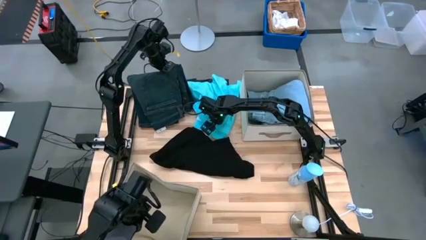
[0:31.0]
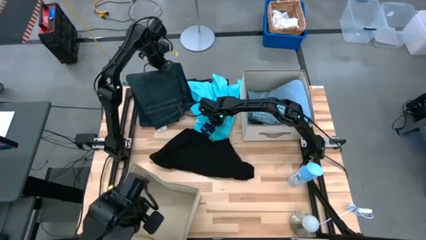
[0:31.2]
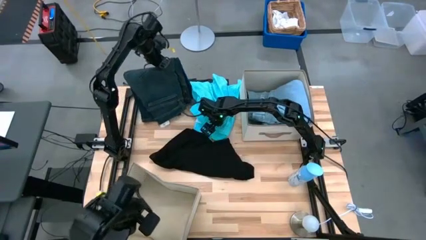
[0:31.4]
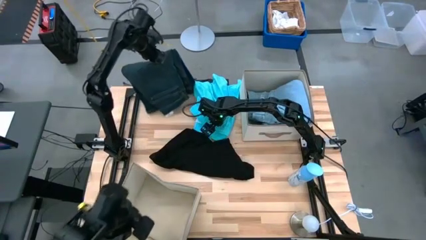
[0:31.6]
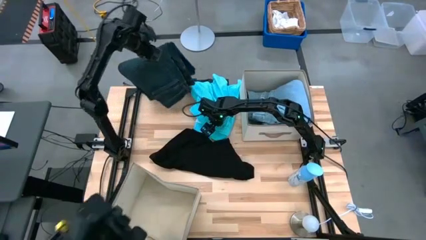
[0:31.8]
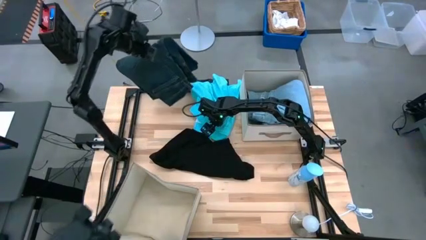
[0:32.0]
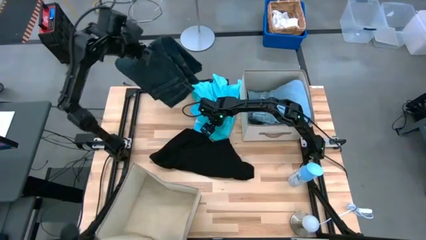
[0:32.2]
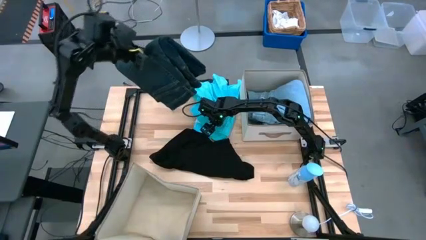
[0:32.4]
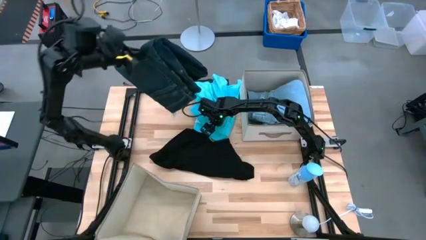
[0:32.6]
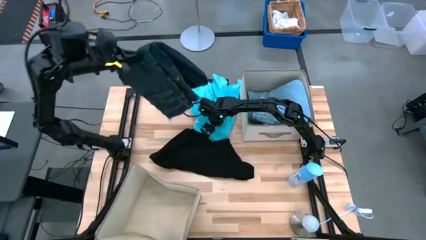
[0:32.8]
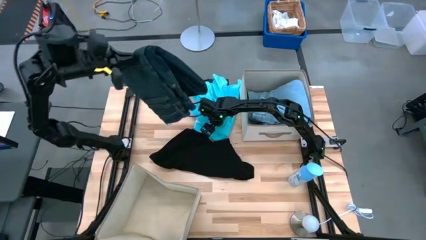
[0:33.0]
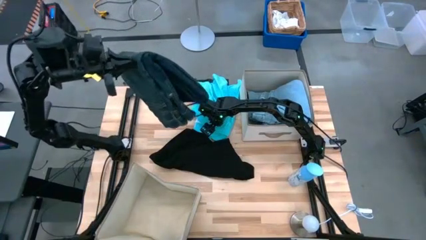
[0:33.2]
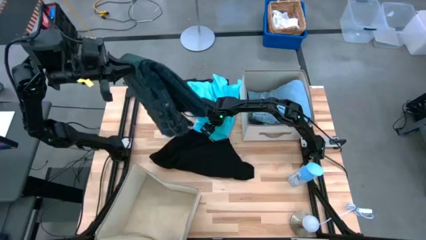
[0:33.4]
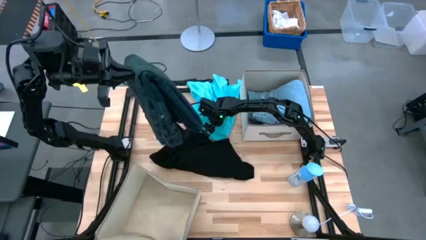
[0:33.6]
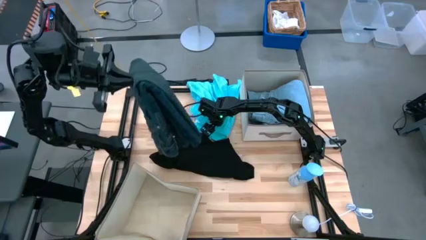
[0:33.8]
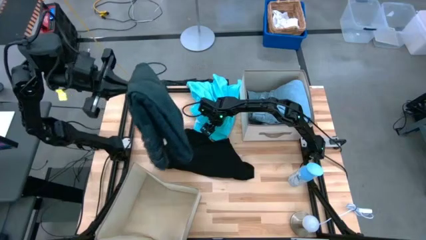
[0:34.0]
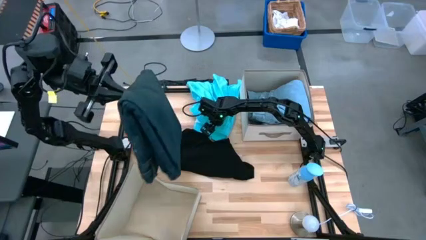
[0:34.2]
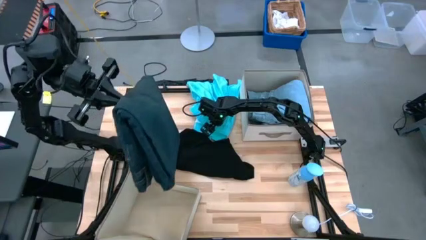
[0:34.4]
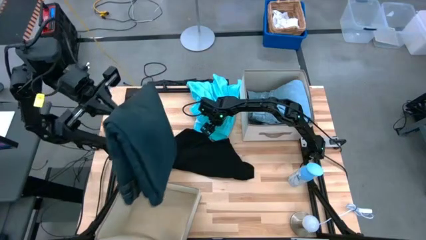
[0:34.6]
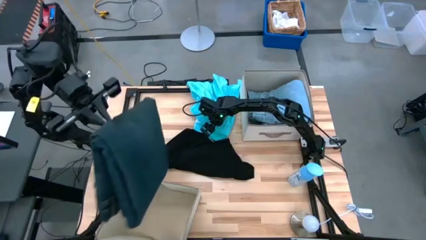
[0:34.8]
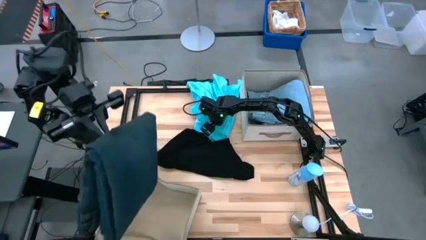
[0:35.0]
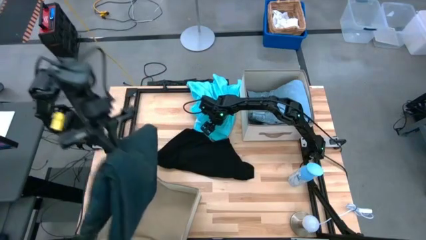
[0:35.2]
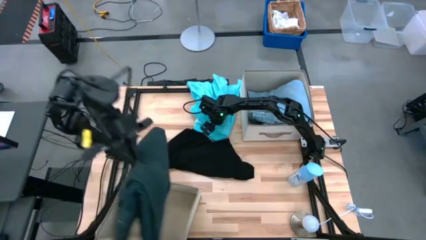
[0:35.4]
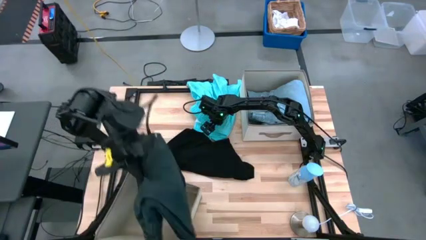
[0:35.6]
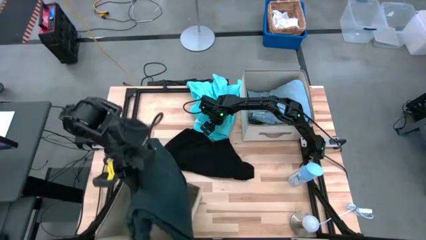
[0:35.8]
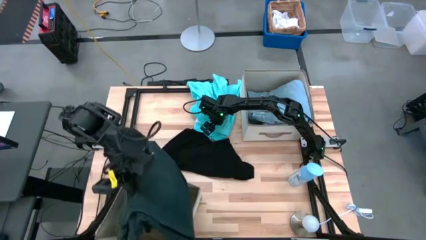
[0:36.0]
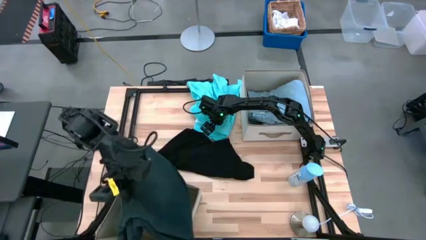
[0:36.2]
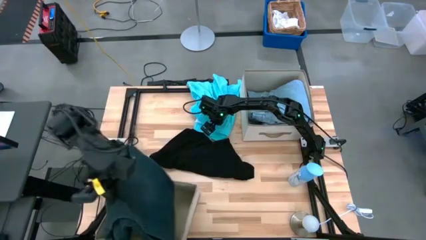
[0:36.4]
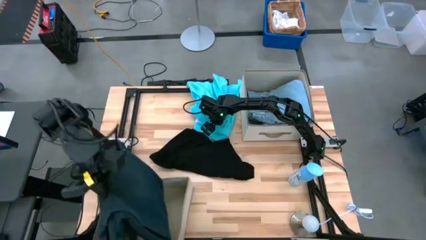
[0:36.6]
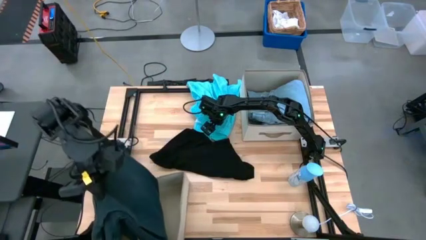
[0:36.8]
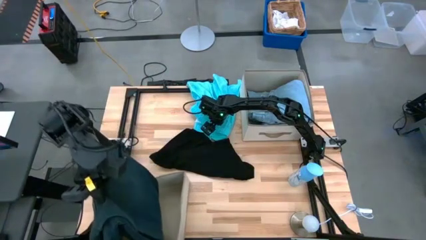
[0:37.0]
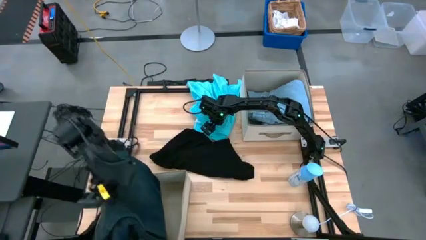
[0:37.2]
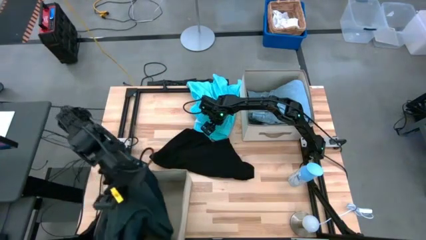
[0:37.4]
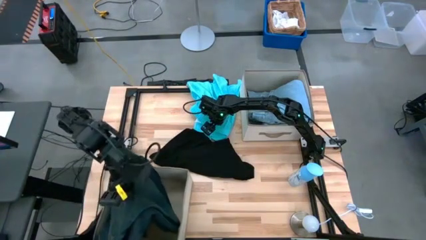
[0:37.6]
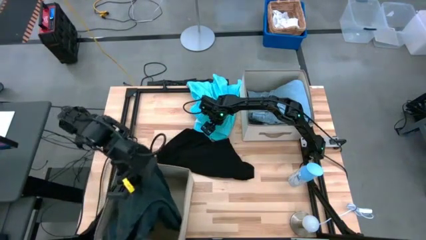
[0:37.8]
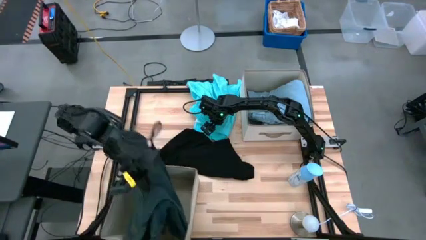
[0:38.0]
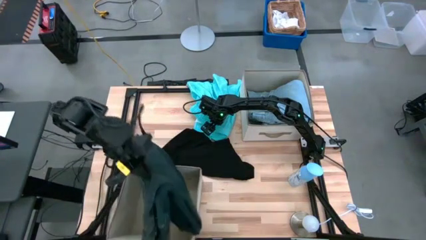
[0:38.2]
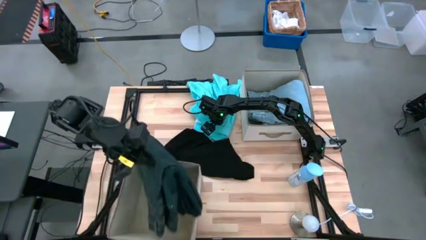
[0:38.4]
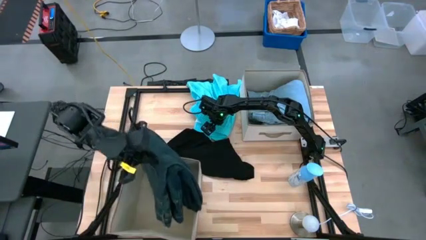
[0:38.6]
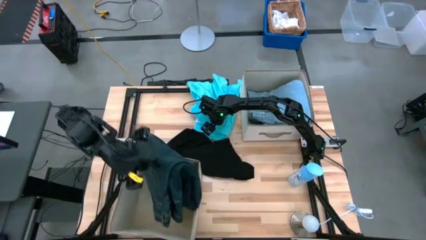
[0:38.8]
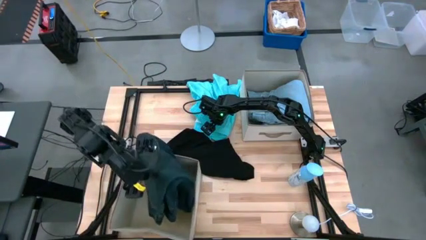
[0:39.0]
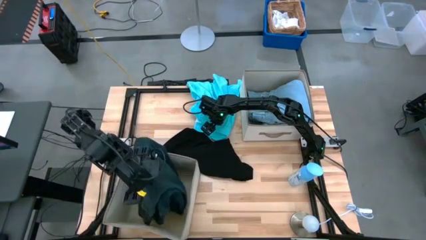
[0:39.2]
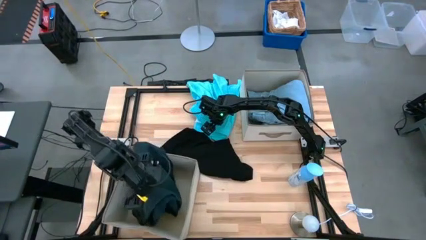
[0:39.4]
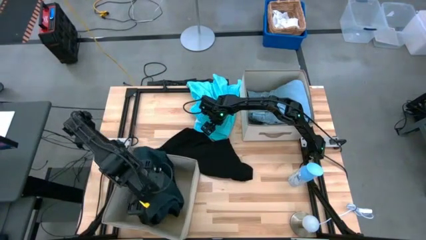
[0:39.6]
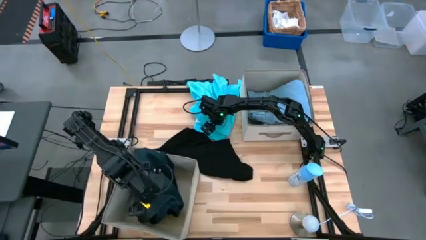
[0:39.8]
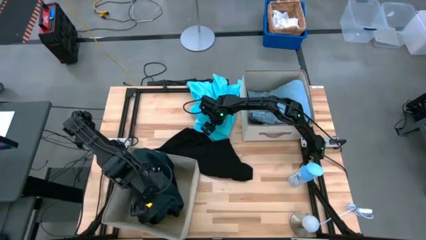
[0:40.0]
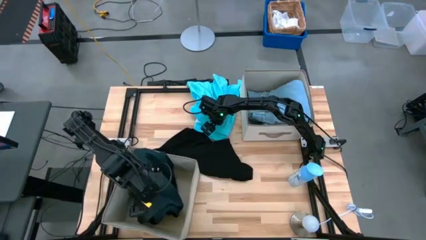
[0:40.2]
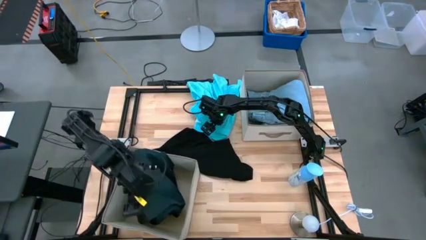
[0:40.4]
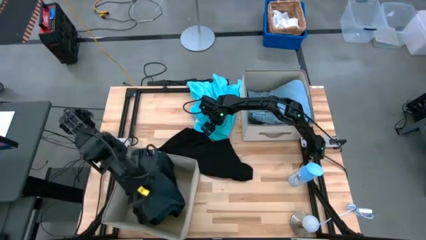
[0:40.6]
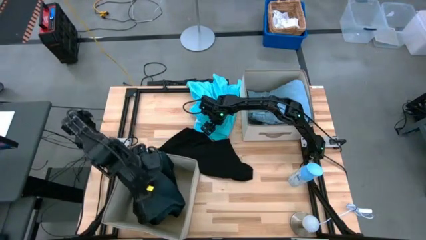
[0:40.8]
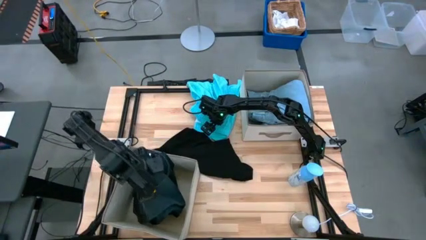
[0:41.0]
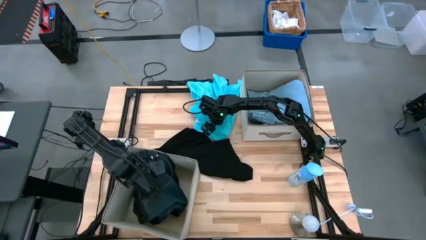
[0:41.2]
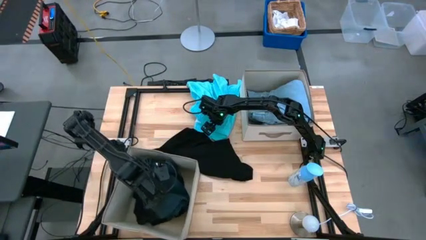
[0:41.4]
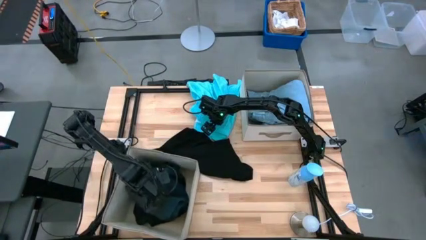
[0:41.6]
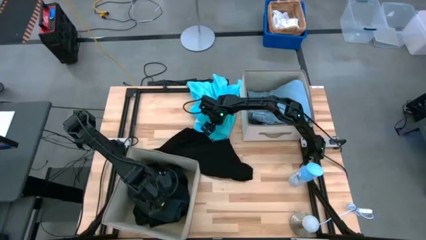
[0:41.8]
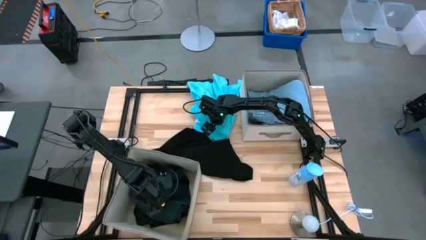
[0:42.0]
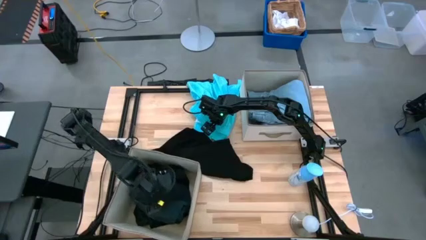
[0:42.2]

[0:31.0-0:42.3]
Task: Sort clothes
Put the dark blue pants into the bottom laundry bin
